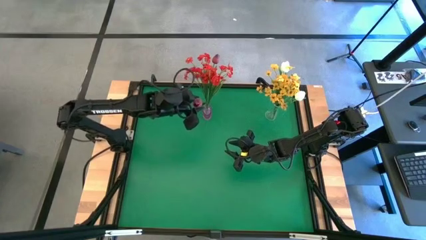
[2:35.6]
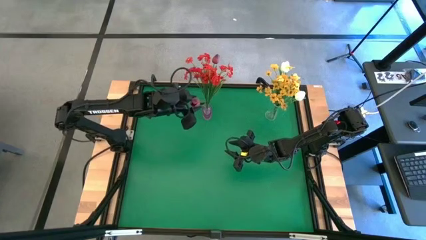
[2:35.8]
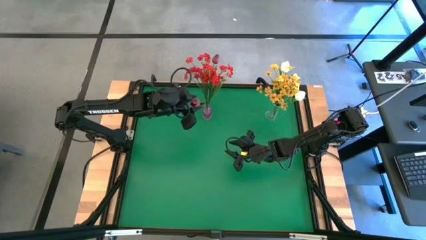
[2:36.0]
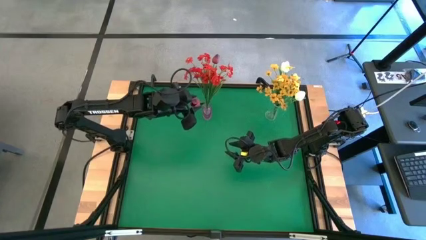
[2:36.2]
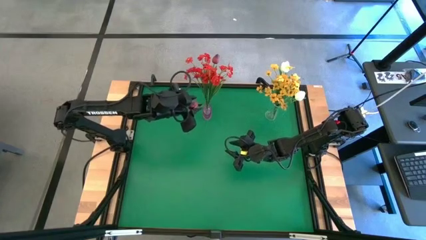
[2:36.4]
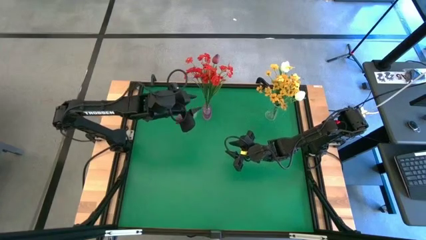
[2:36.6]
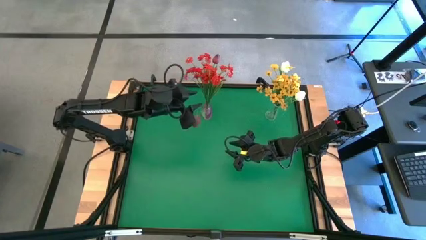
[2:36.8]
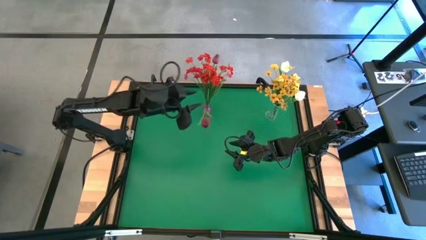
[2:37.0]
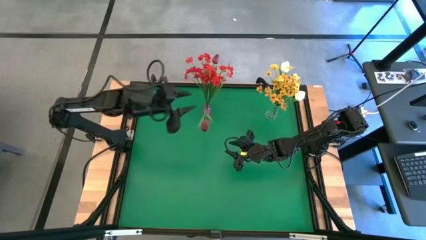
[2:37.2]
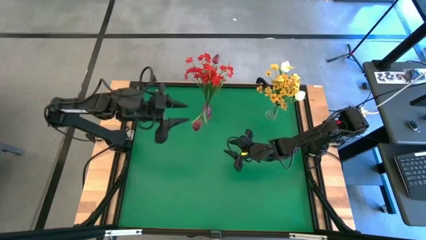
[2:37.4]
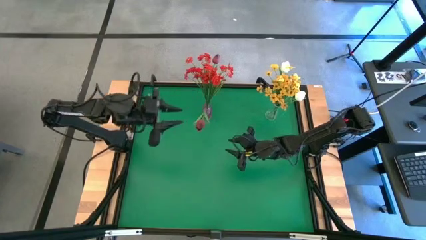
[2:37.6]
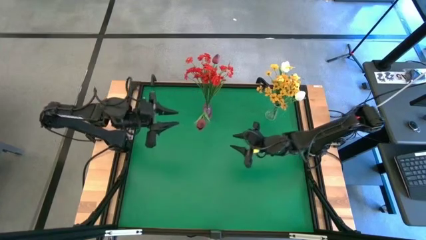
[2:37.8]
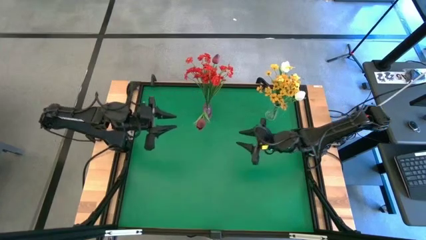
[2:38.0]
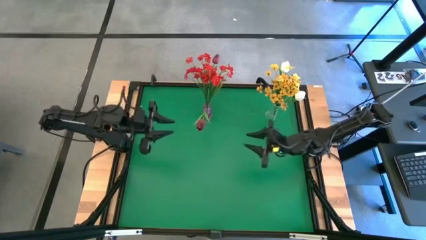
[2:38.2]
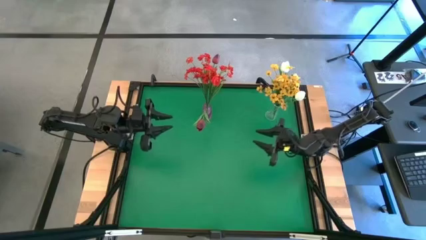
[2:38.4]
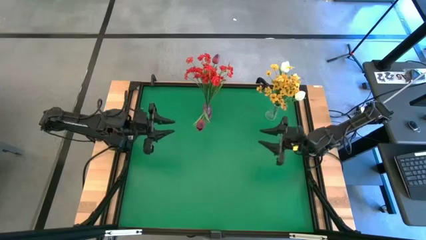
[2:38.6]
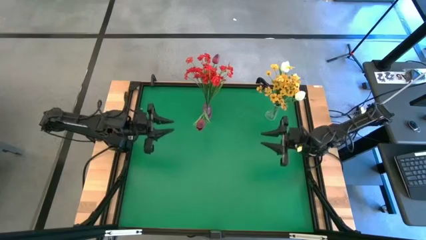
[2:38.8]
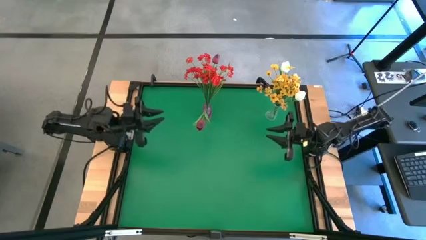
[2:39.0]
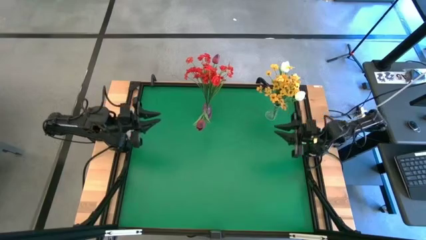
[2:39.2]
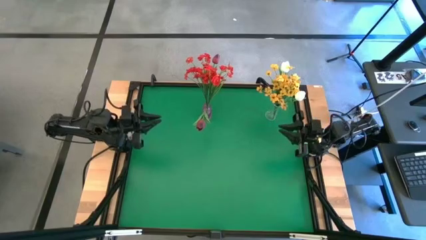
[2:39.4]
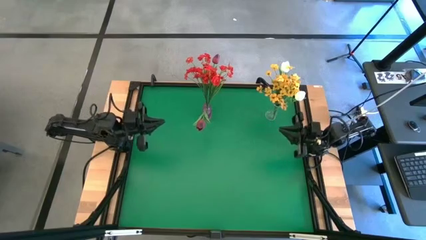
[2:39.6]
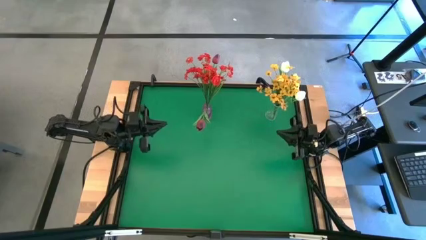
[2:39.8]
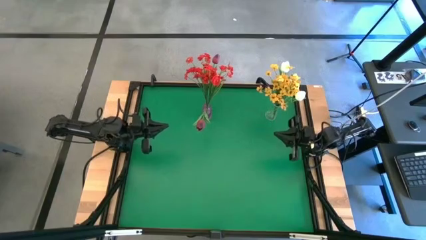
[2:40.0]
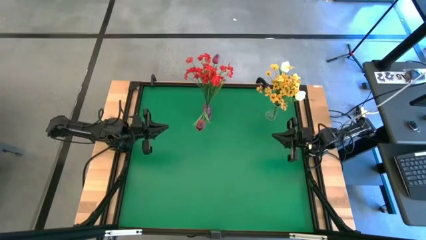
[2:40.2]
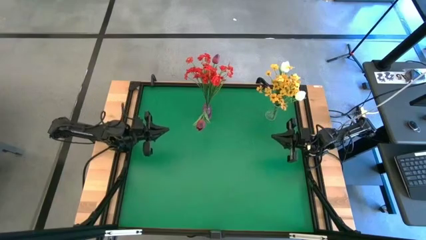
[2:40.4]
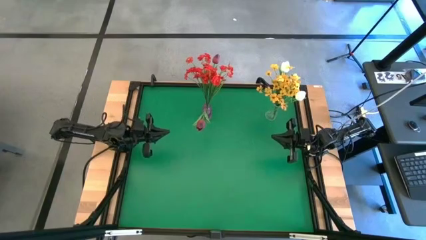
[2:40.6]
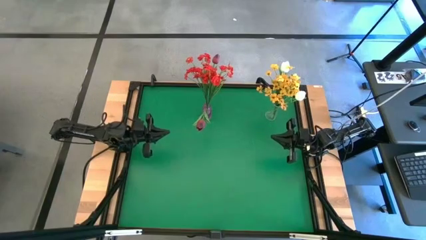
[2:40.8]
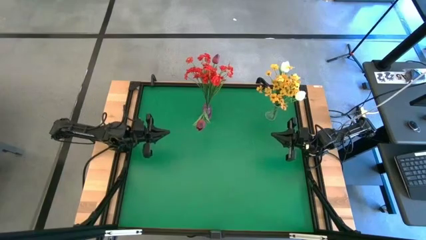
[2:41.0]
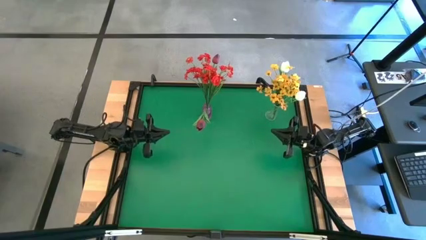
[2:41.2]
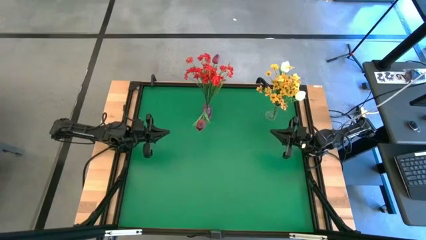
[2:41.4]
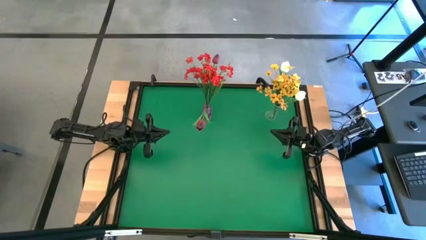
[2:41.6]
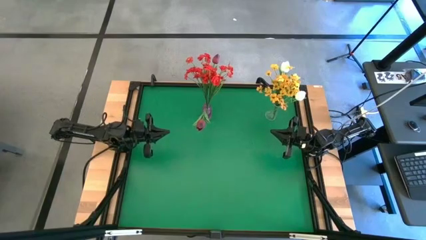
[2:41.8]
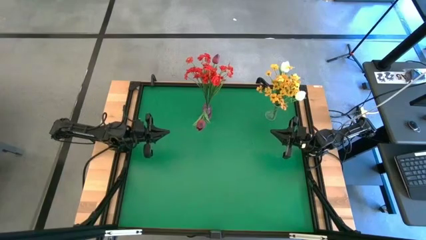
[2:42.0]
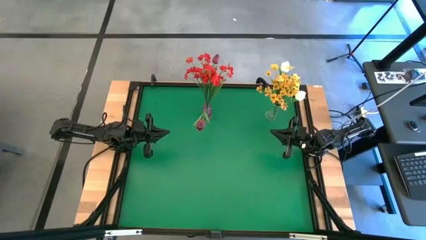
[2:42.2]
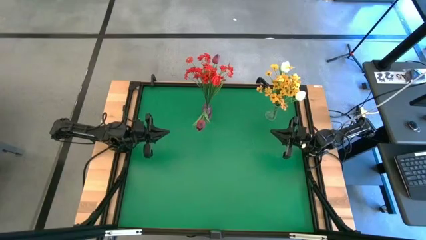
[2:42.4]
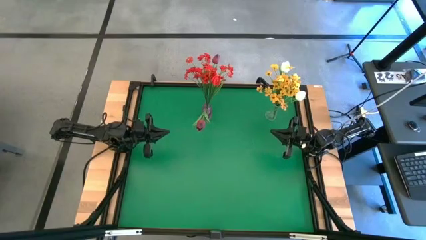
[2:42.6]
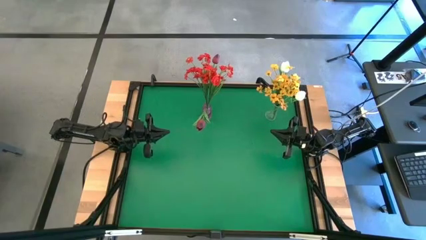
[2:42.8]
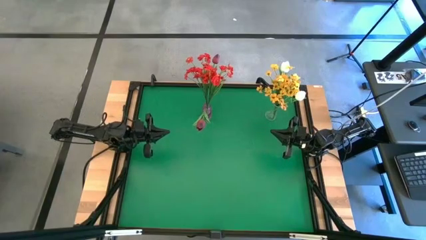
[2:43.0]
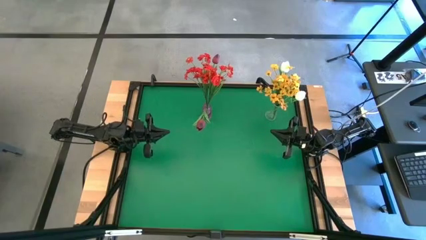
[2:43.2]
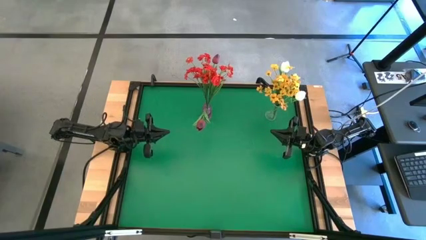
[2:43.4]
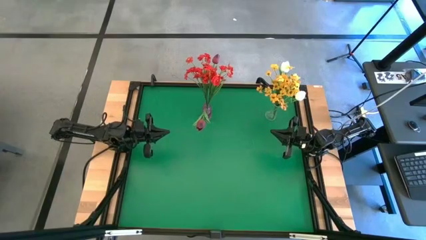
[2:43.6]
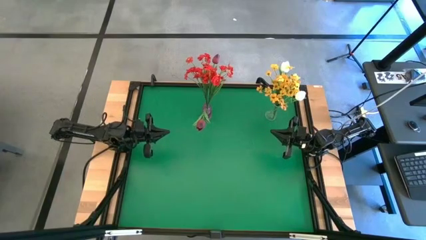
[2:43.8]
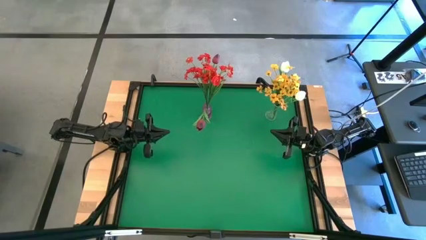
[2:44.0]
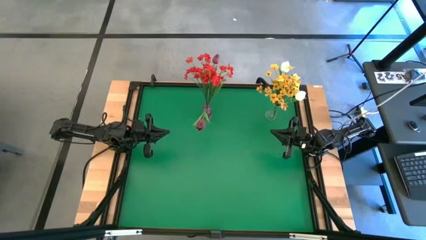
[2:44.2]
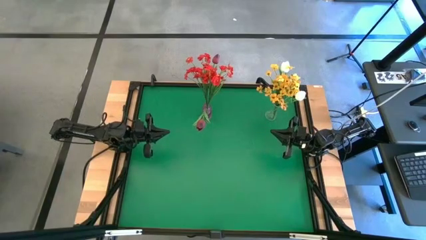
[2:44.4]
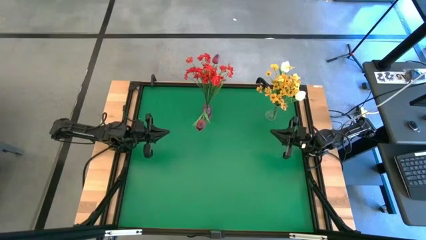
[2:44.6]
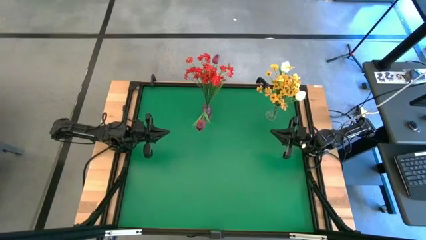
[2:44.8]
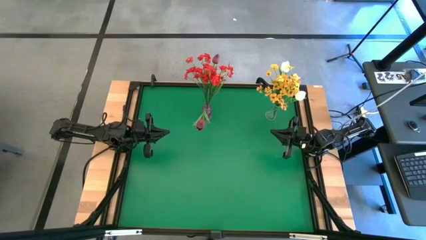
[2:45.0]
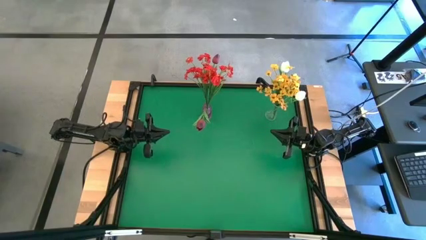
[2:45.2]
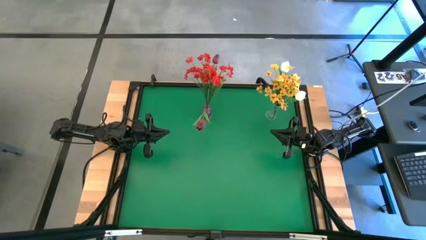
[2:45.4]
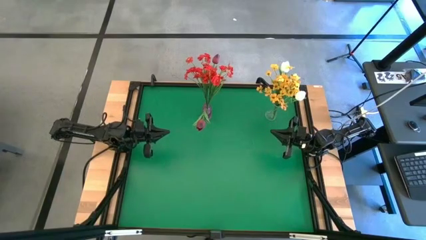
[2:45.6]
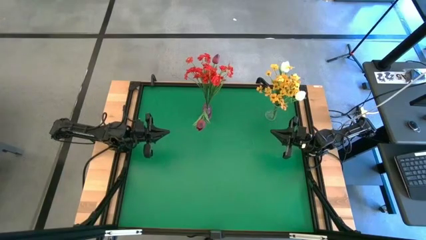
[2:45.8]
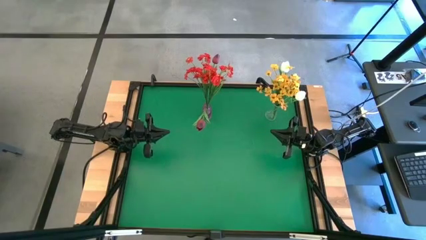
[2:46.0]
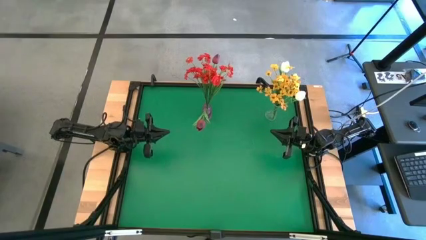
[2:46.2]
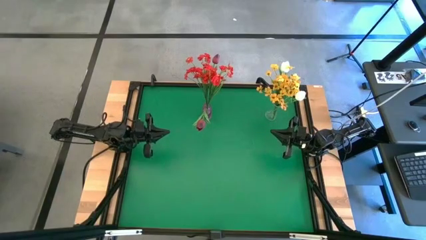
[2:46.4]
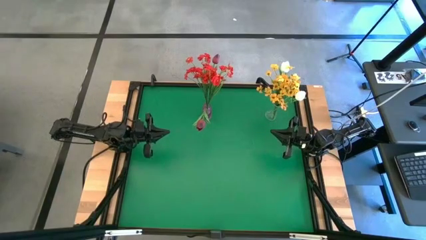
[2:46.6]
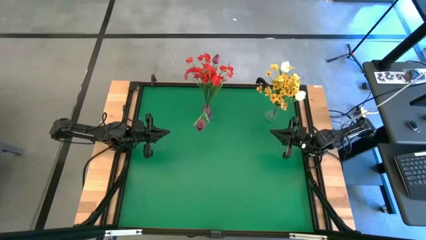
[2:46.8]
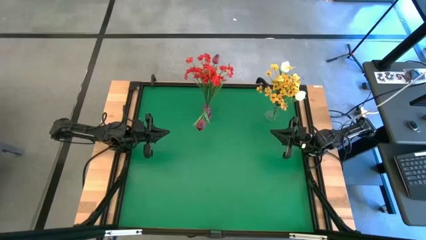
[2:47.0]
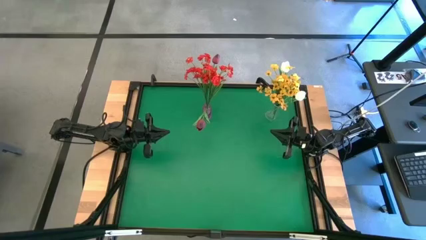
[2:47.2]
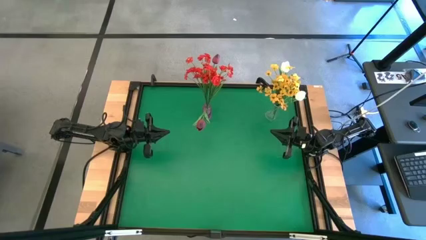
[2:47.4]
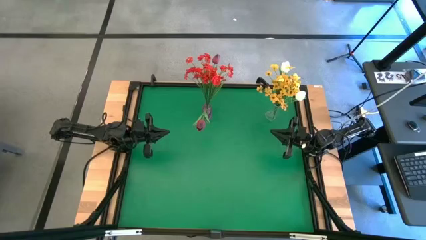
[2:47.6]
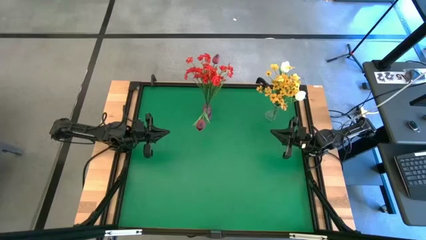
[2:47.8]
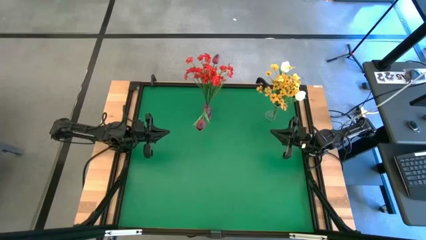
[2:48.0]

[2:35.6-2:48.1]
Task: Sort flowers into vase by color
Return to Home Position

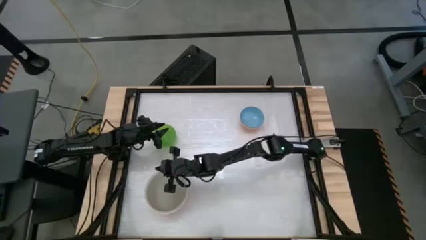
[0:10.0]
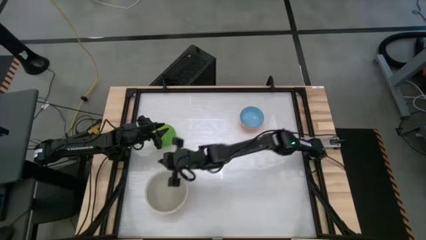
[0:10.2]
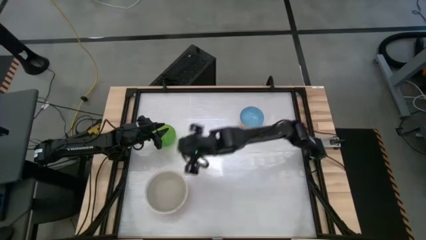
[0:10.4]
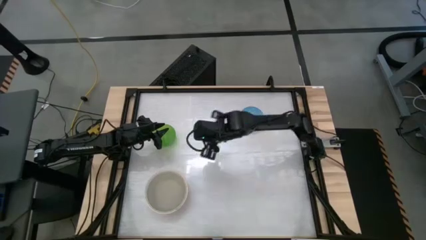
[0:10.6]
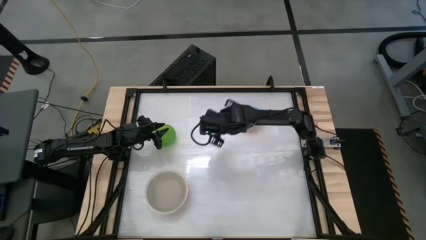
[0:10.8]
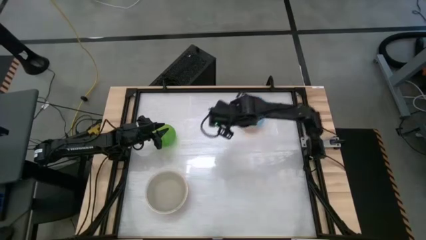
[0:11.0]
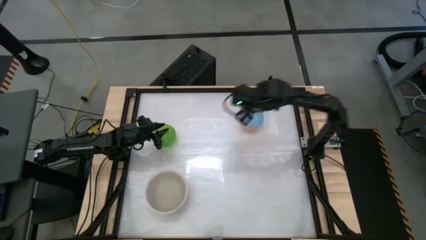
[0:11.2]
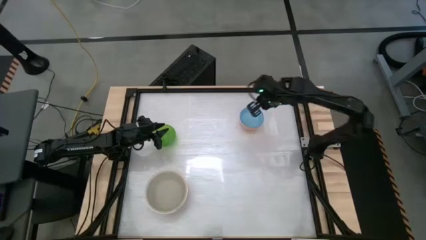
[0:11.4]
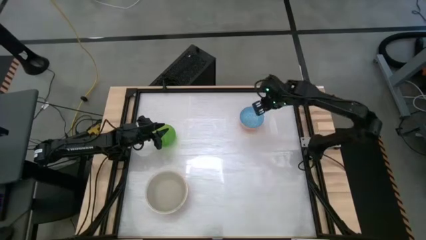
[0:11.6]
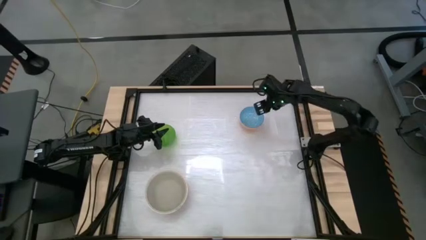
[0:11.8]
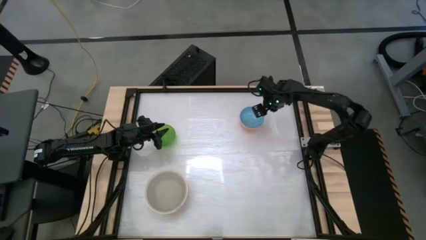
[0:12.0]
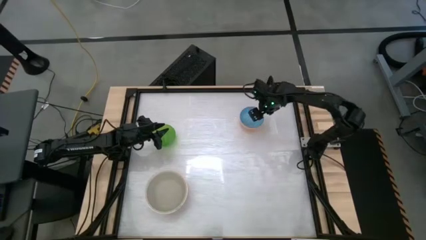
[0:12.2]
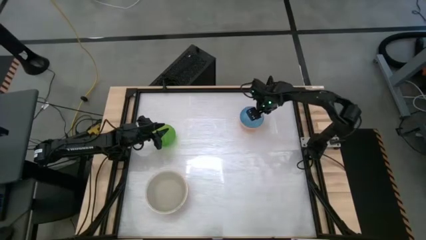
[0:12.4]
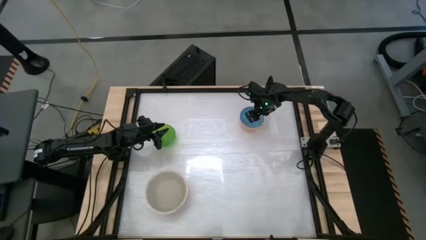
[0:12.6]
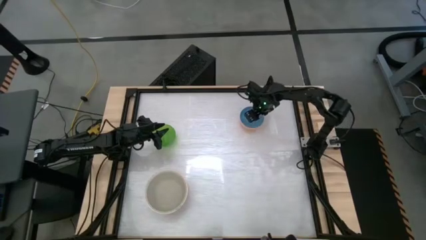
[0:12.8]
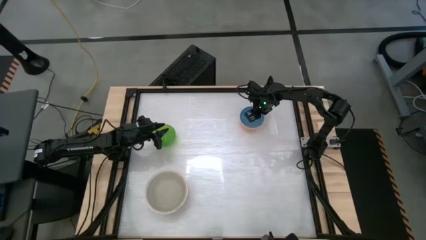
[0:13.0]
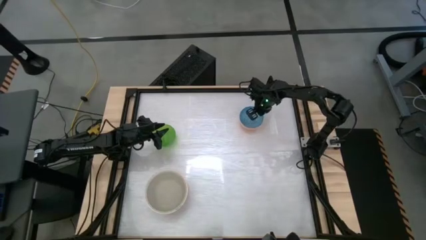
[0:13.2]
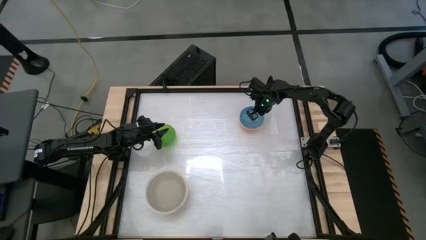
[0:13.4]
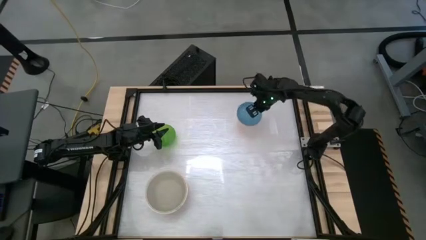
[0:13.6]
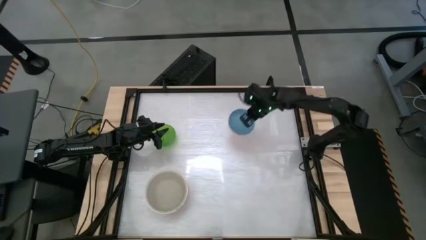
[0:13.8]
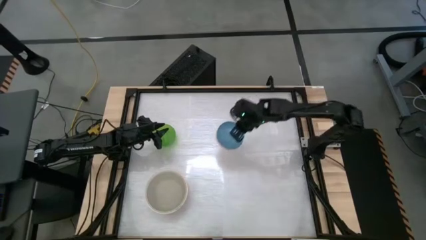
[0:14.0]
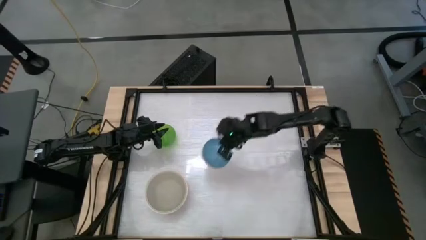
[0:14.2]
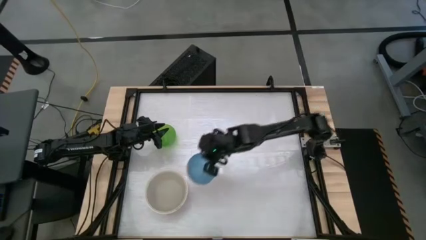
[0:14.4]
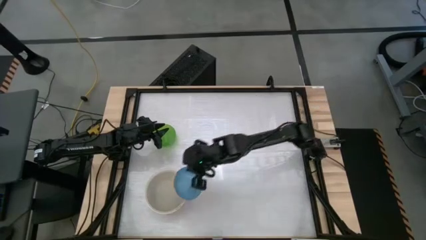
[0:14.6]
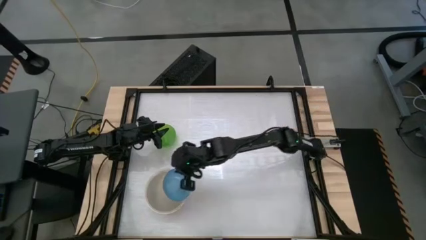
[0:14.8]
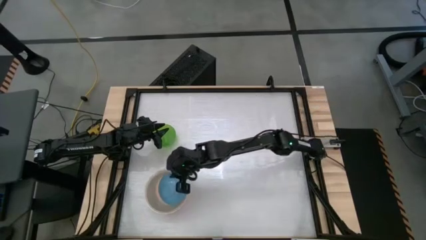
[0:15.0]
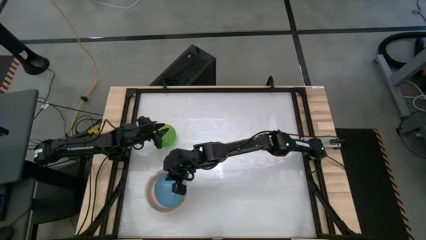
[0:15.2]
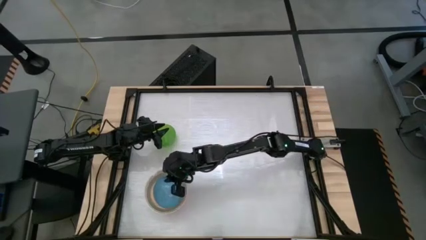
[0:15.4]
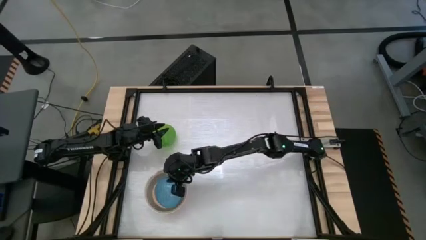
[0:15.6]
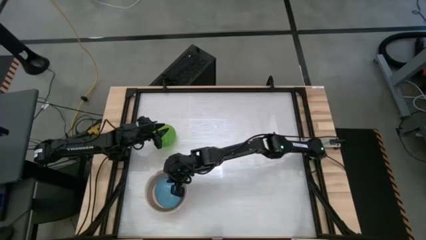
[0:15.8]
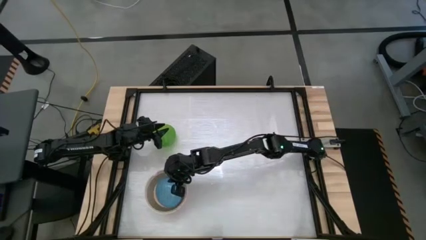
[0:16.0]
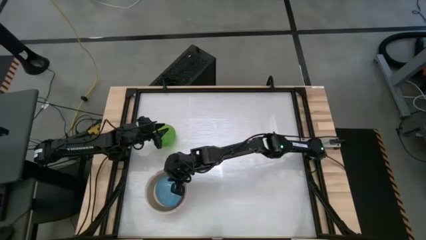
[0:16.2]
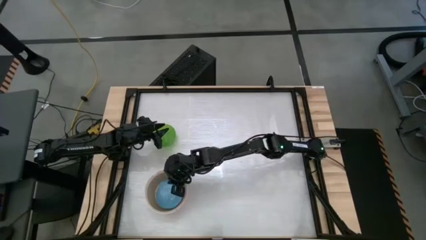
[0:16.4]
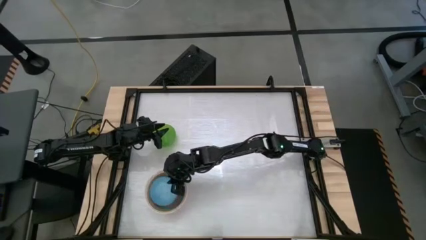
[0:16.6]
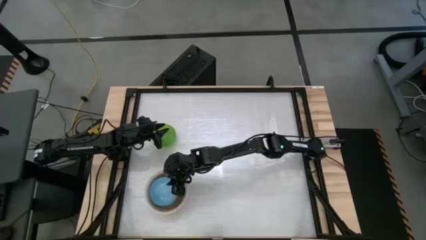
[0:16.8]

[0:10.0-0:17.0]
Task: Nest bowls inside each other by size order
Stack the orange and blue patterned bowl on top of the gray bowl
